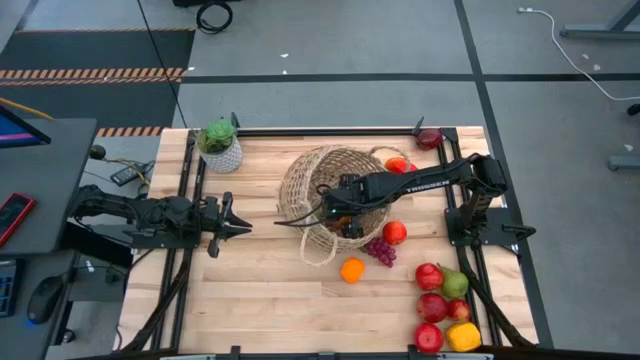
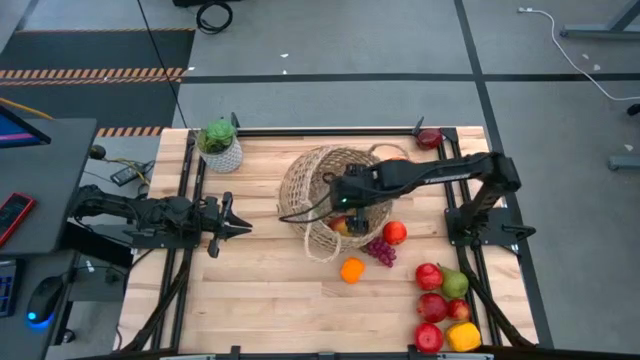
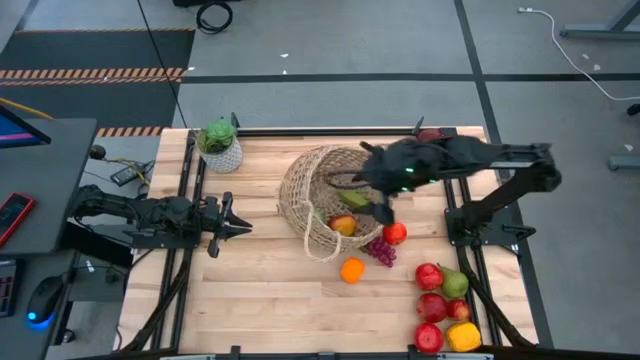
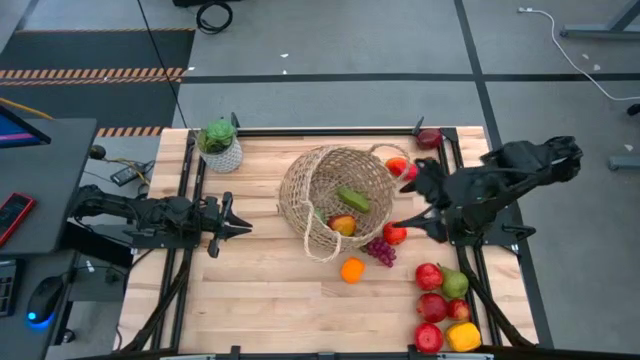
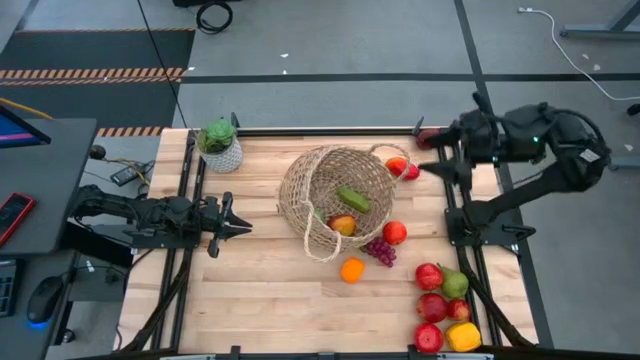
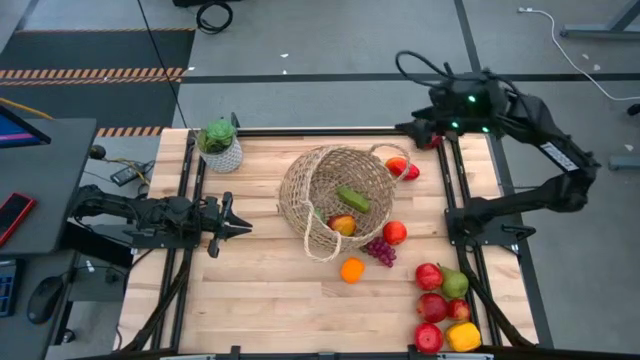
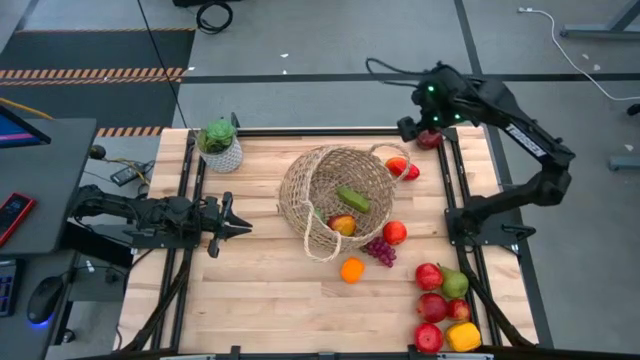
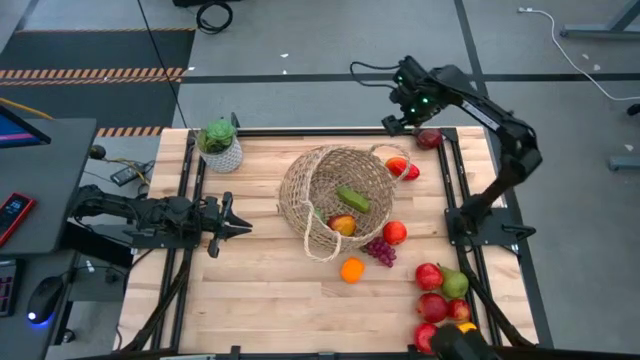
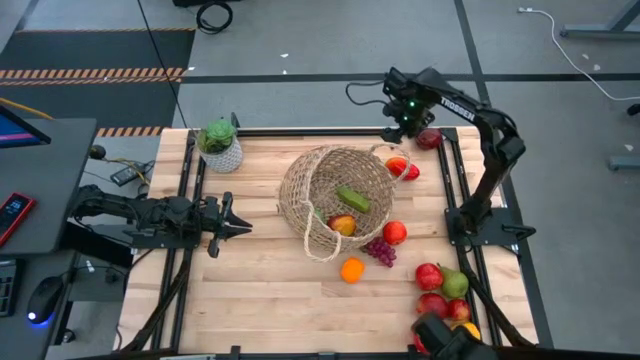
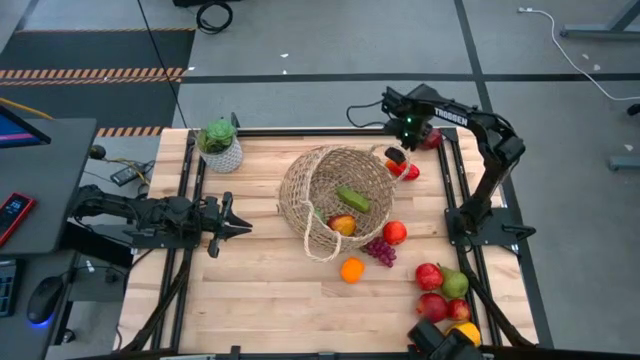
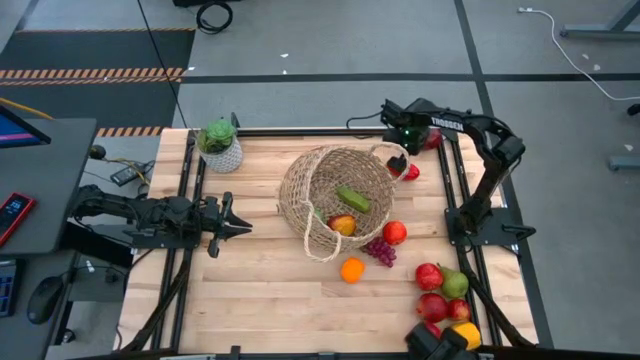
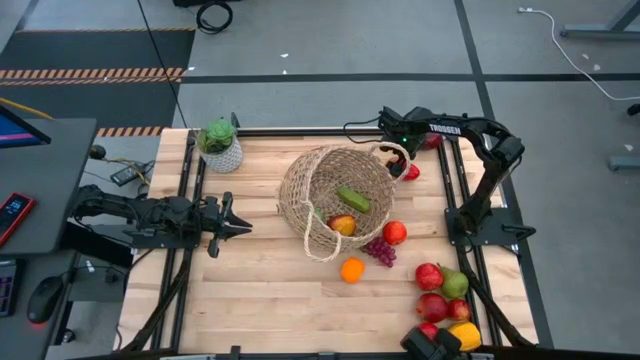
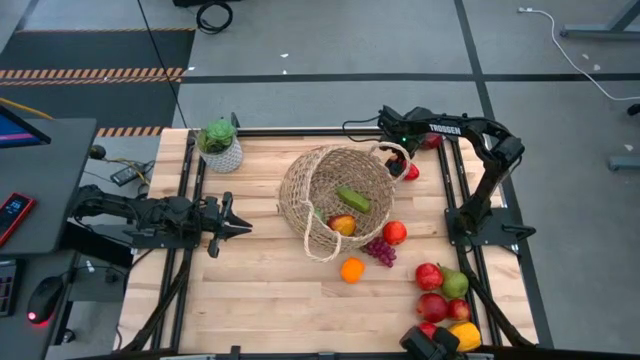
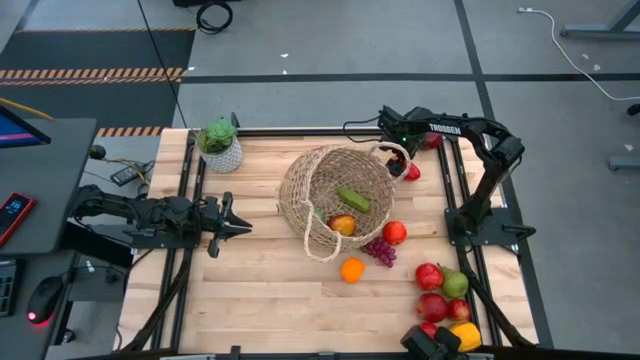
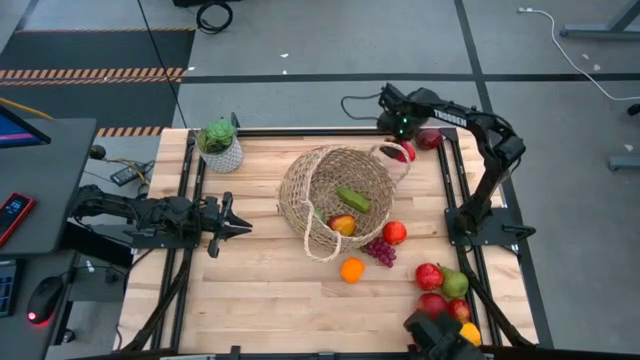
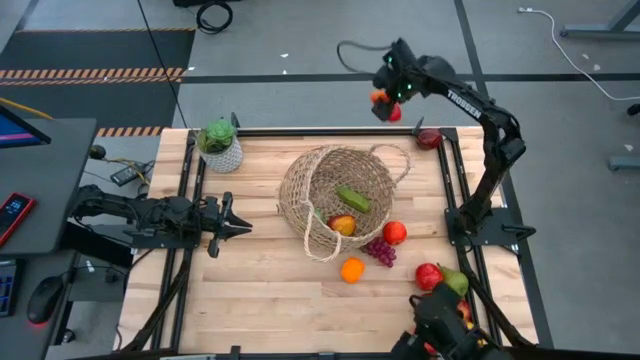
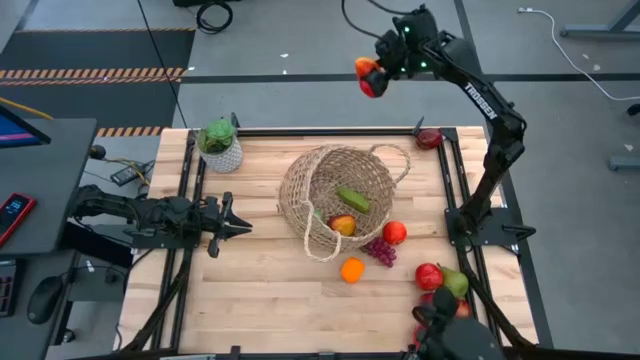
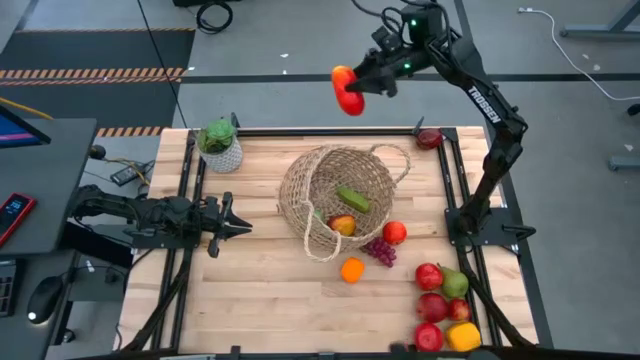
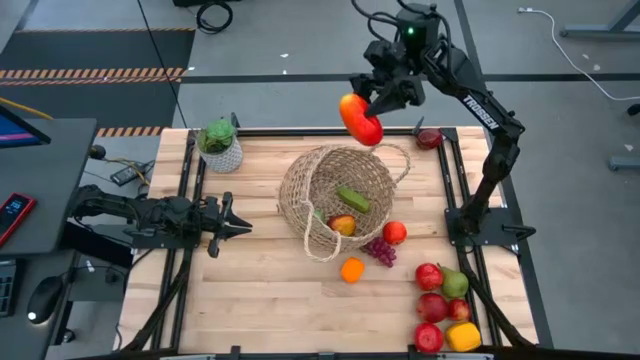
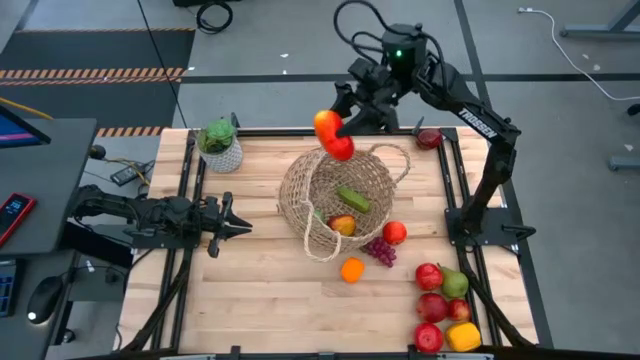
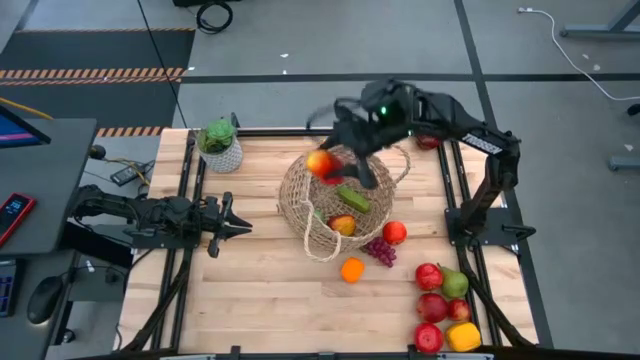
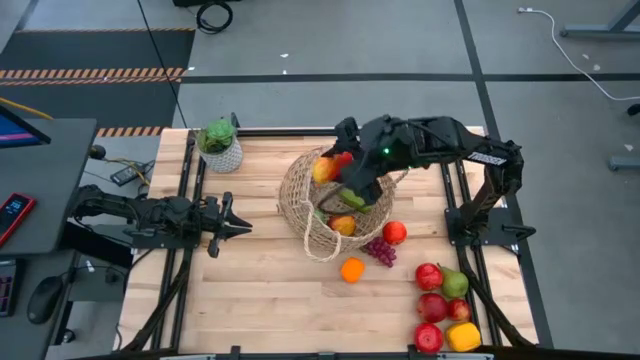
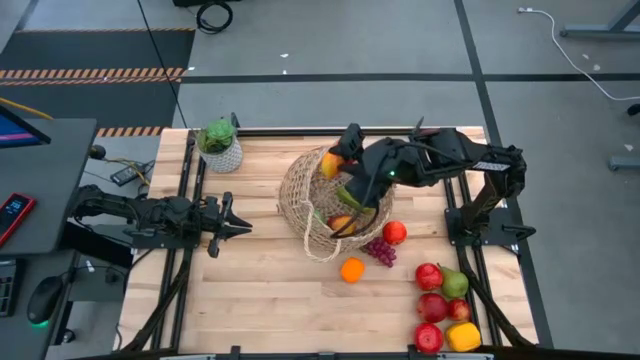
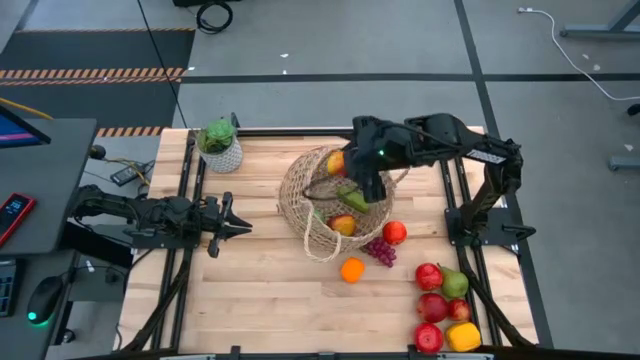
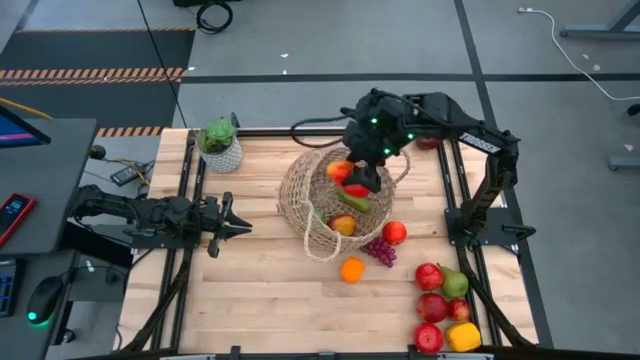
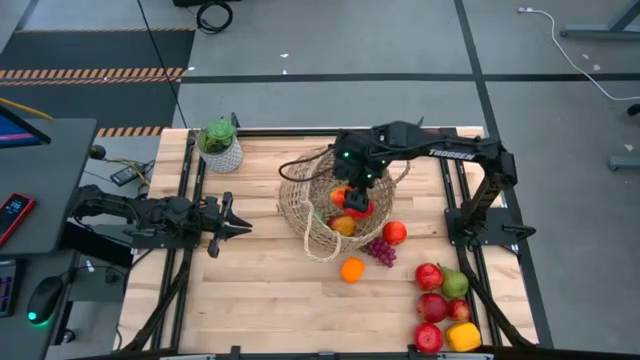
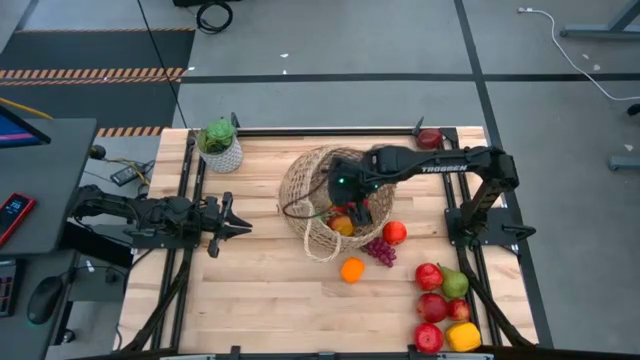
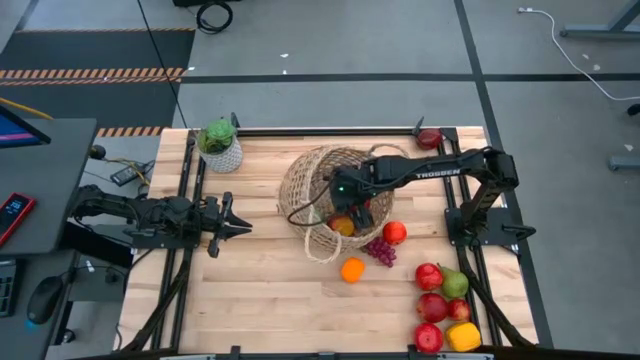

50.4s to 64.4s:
Task: Build produce basket
Put the red mango into the woven basket

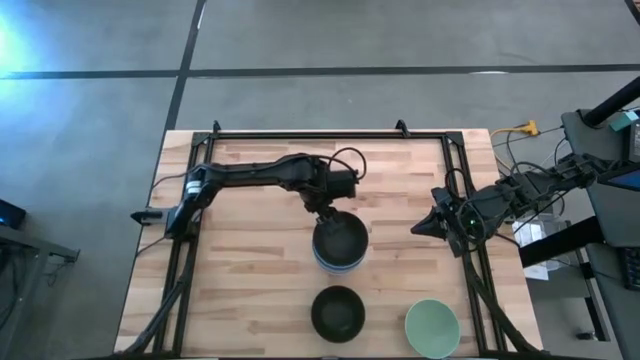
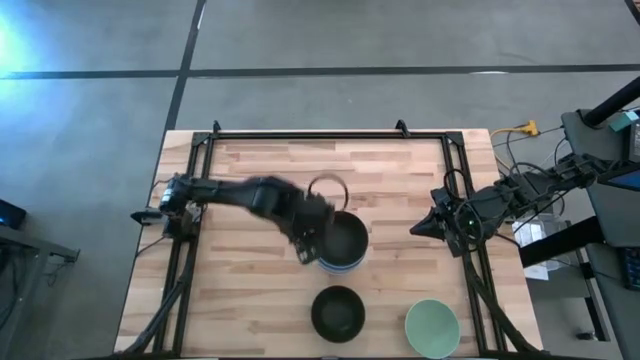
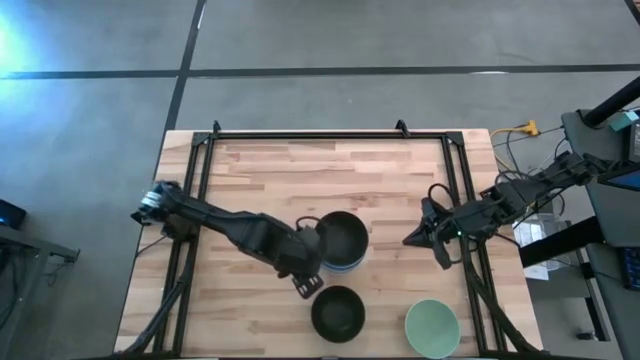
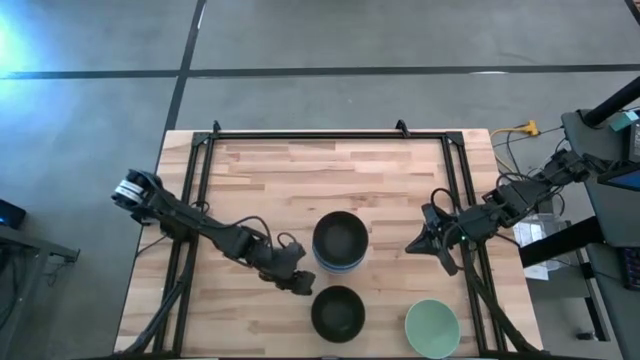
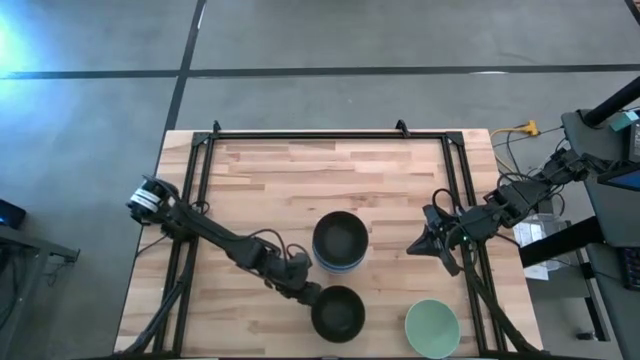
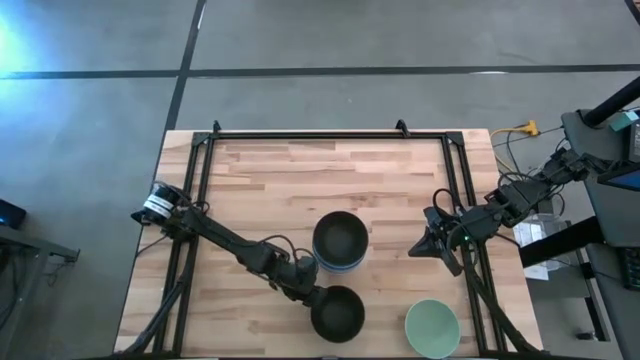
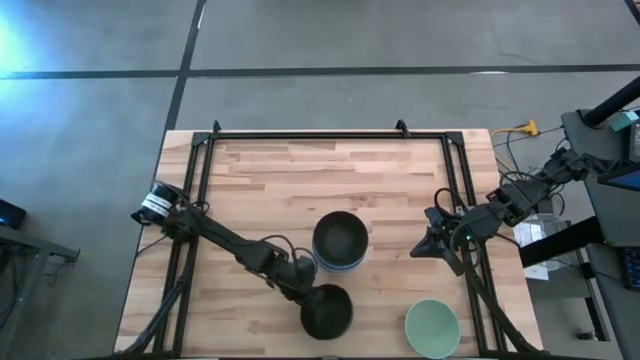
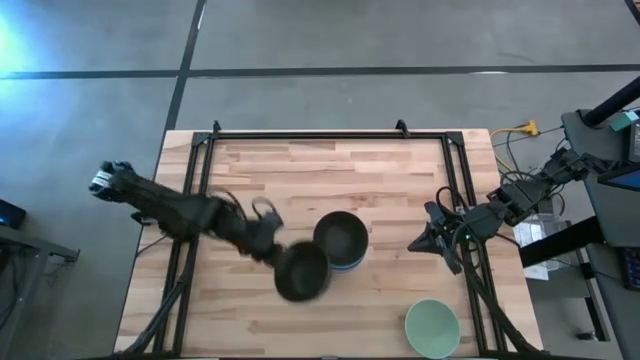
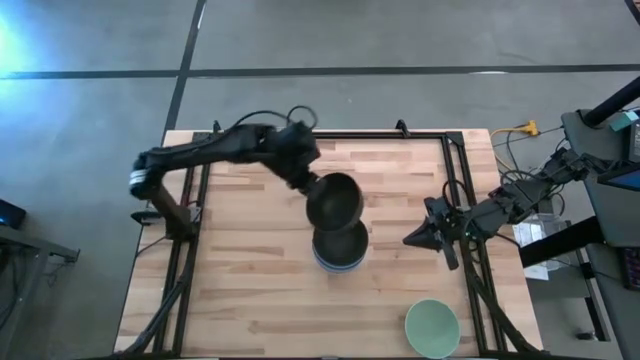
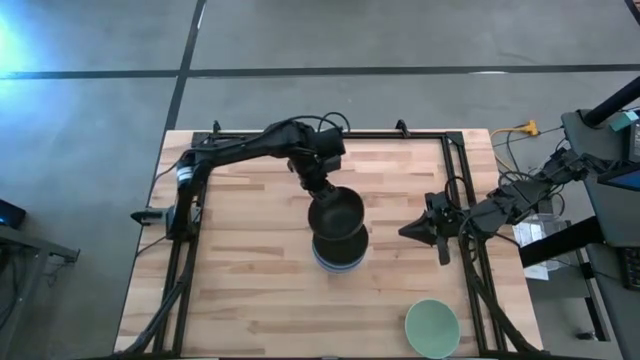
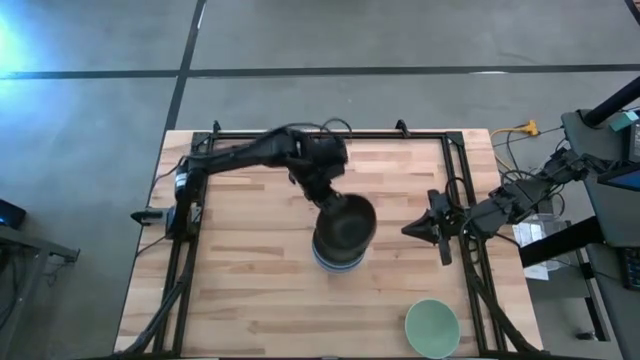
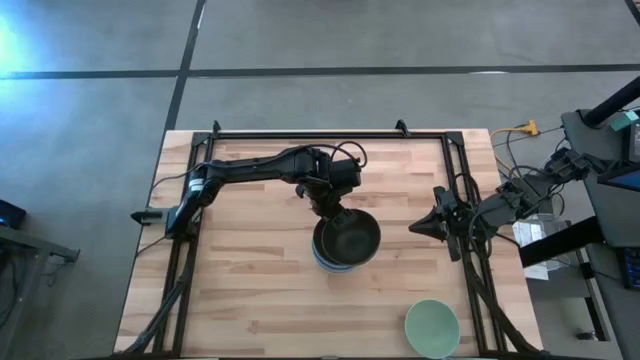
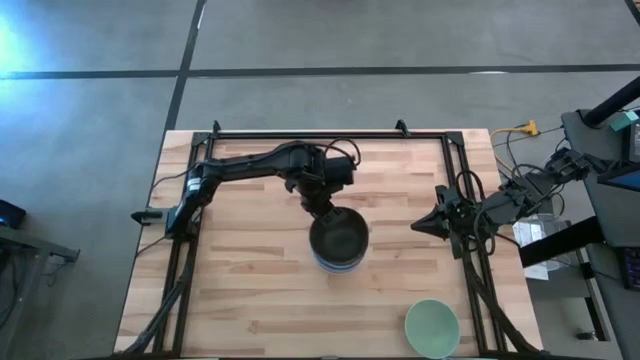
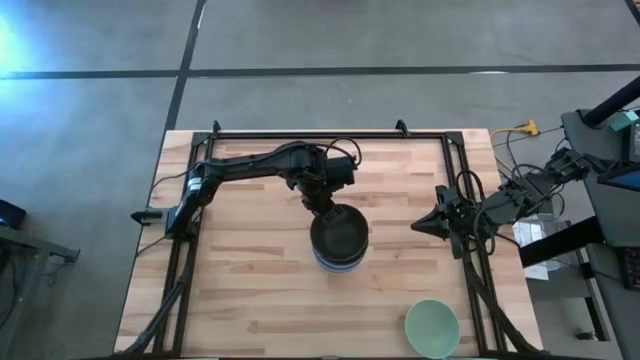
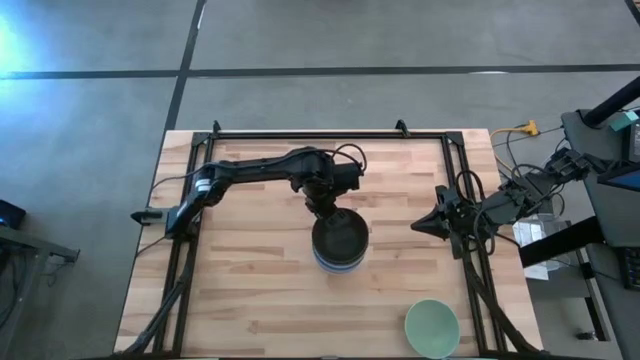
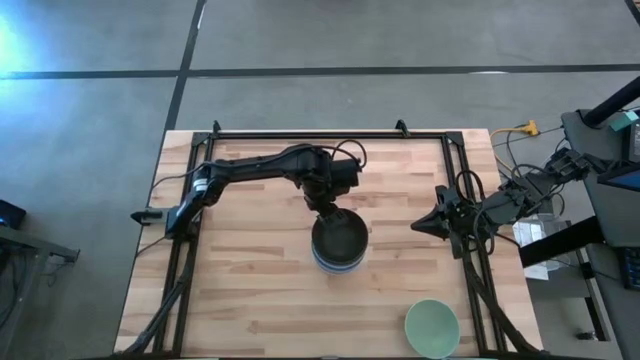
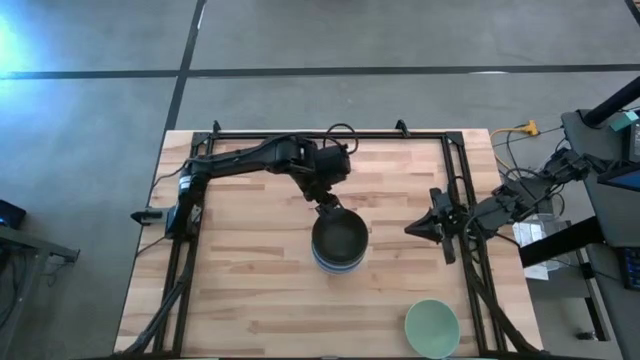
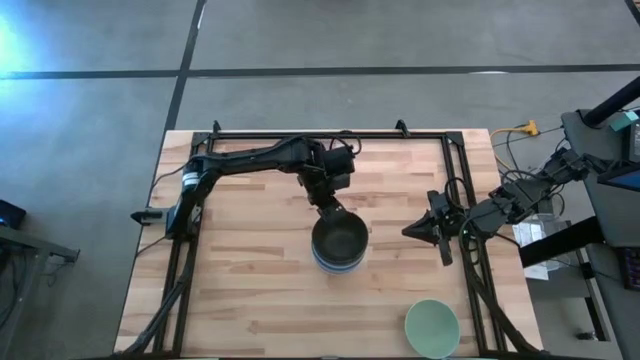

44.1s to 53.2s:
Task: Nest bowls inside each other
Stack the black bowl on top of the black bowl
